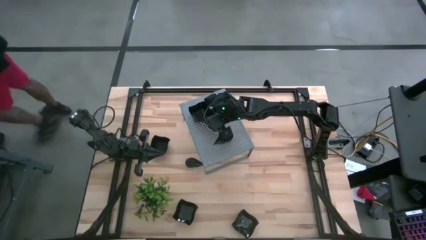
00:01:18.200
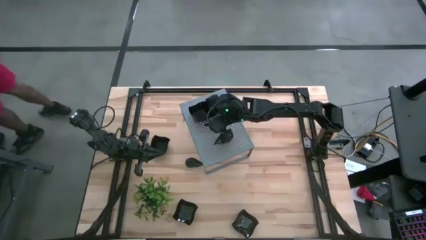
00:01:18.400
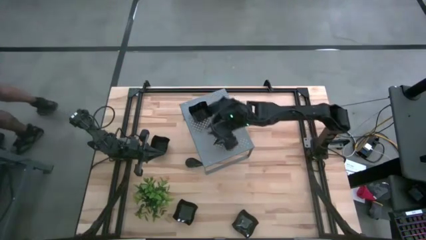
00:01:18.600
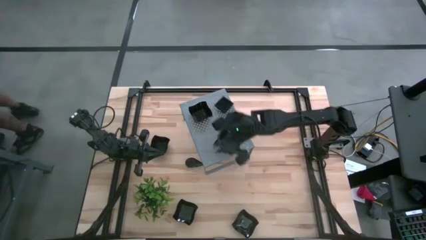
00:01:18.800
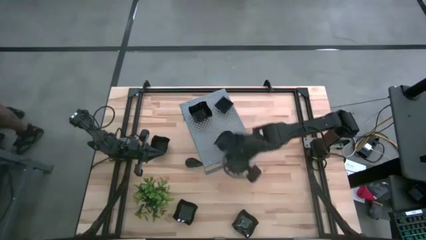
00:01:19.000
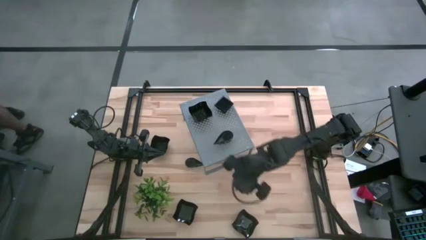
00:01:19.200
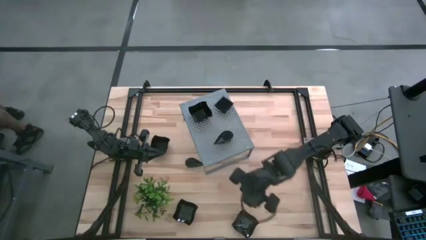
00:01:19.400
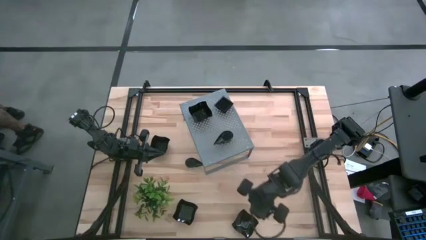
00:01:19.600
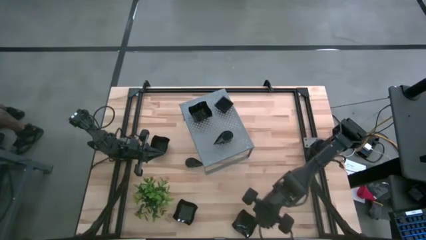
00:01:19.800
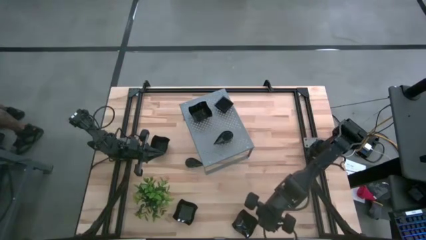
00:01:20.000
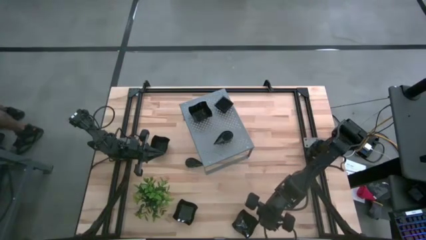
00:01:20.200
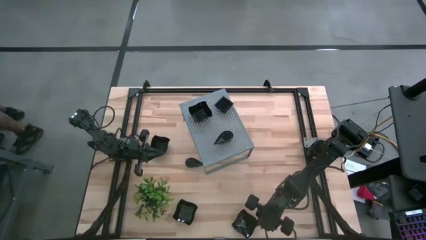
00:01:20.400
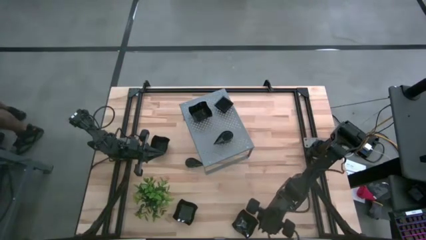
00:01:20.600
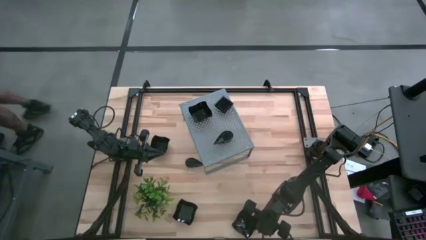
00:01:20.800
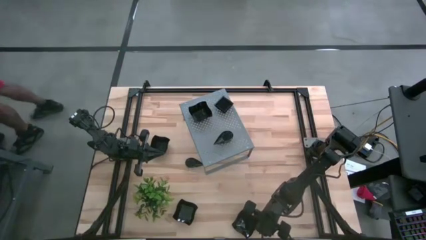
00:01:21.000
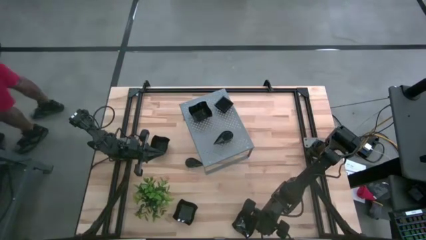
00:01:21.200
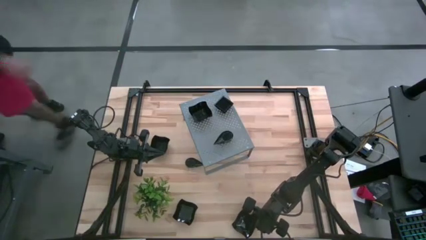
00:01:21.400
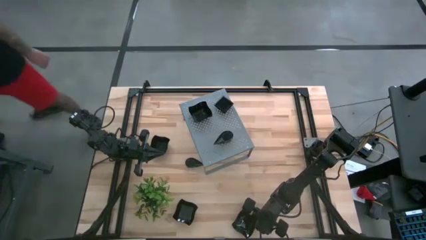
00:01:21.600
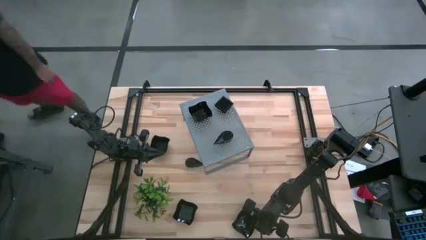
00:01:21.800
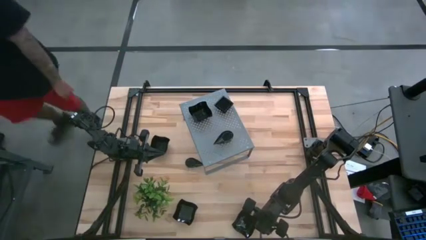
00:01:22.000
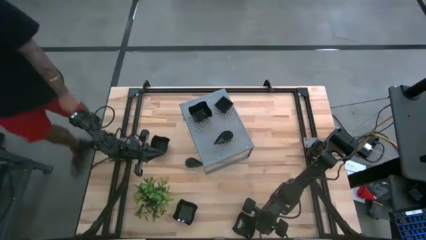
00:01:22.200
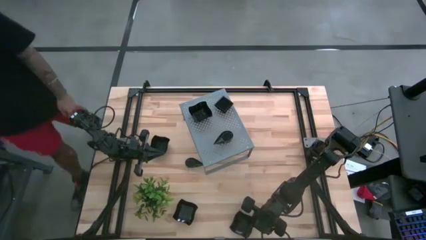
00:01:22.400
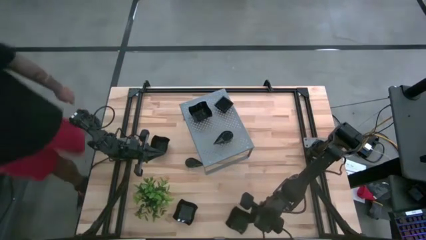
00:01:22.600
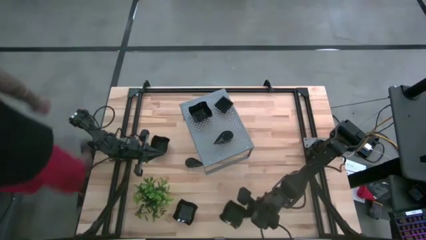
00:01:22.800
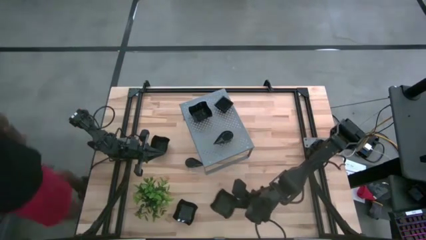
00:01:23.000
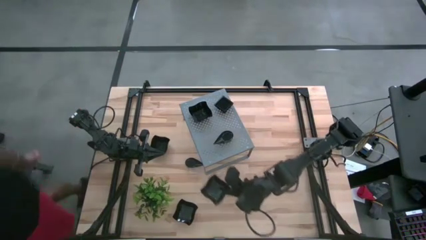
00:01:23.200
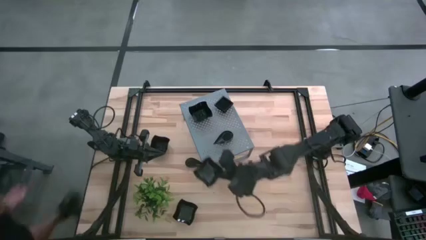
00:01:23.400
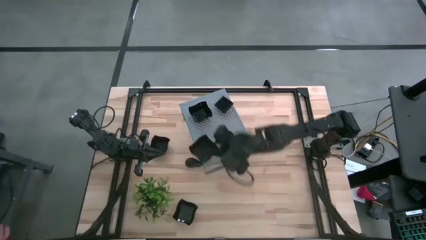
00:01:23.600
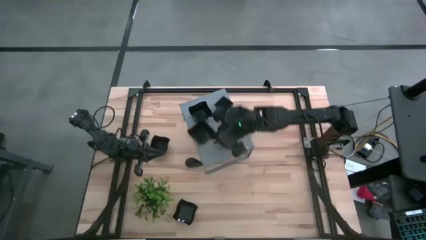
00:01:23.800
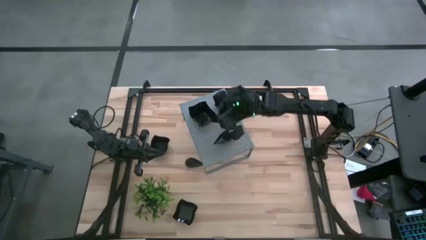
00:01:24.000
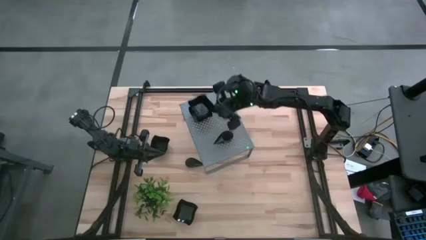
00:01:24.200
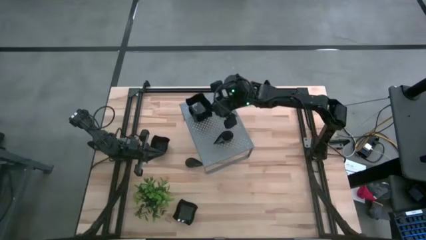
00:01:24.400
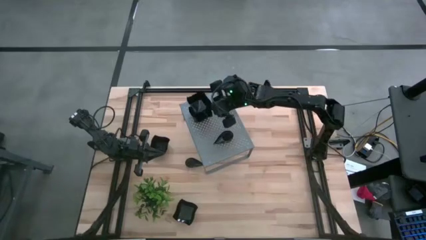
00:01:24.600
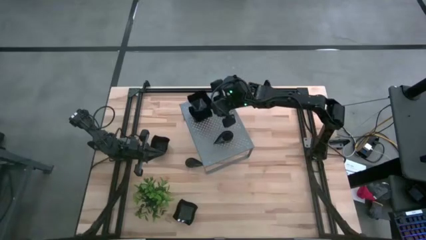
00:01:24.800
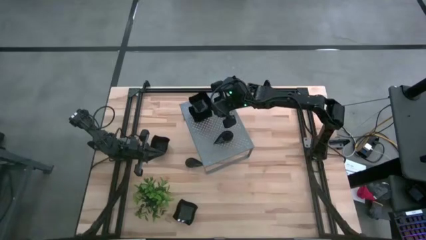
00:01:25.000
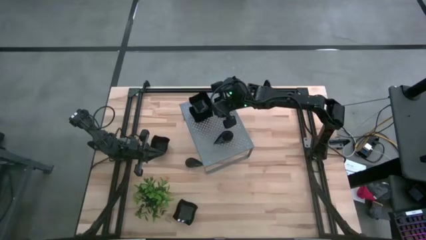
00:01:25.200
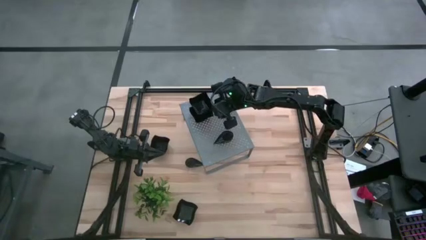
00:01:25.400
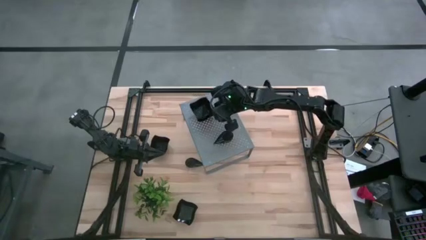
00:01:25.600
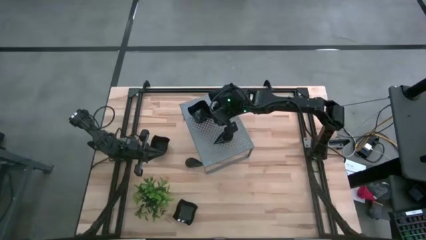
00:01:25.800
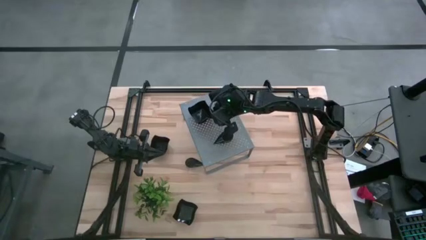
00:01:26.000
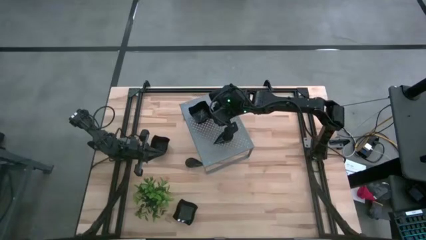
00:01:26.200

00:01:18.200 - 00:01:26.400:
Task: Pick & Place Mini shaped plates
Stack the distorted square plate on top of the distorted square plate on the shelf

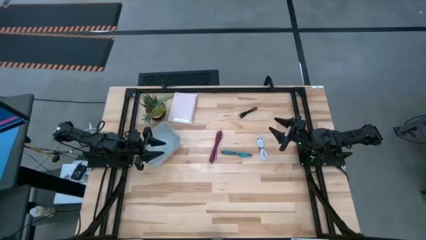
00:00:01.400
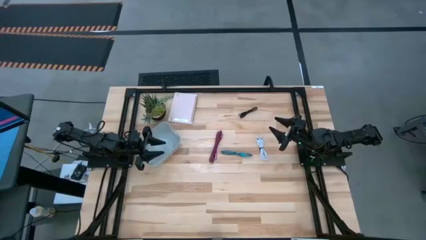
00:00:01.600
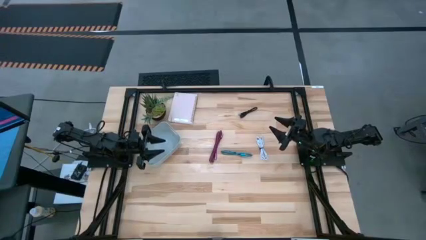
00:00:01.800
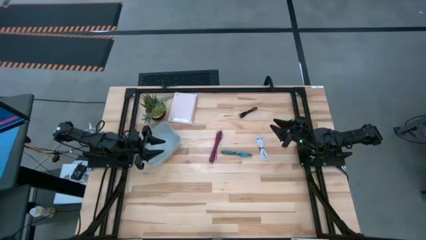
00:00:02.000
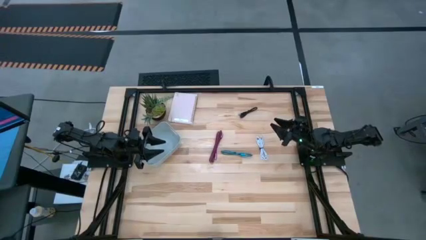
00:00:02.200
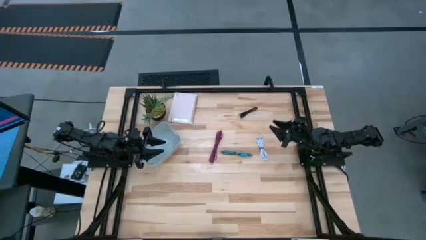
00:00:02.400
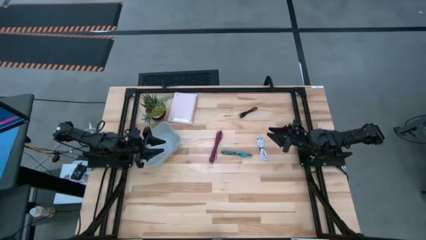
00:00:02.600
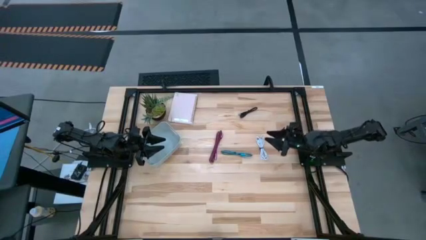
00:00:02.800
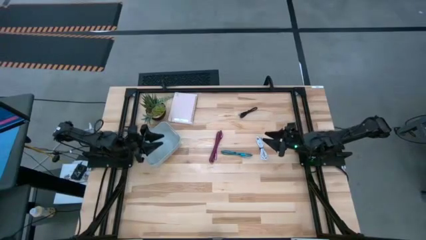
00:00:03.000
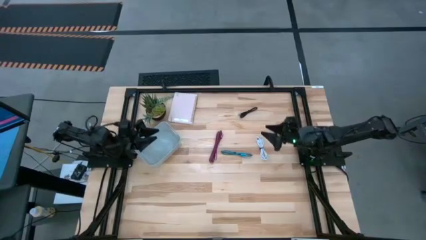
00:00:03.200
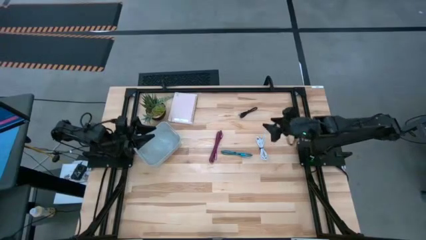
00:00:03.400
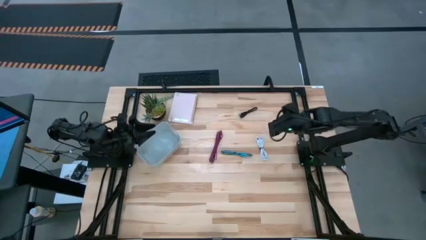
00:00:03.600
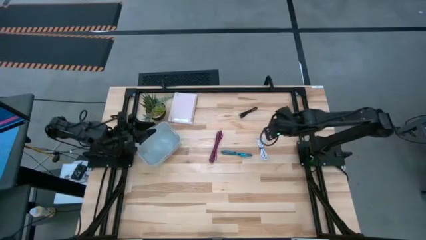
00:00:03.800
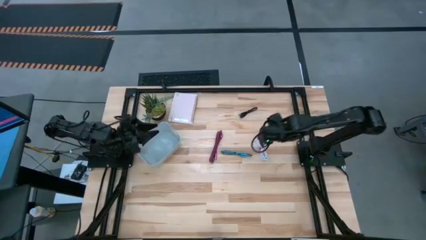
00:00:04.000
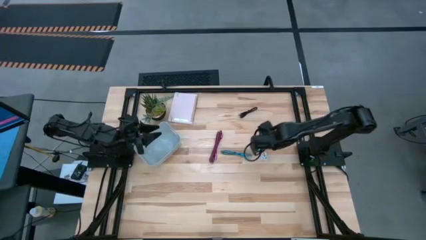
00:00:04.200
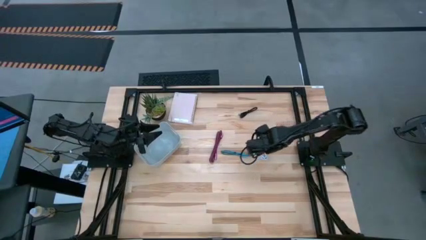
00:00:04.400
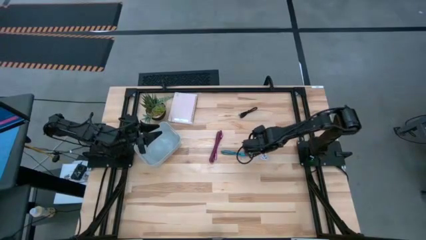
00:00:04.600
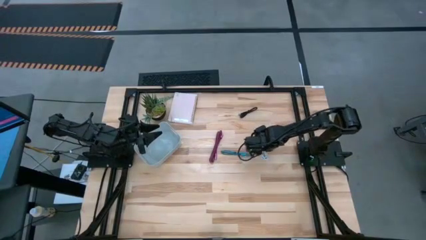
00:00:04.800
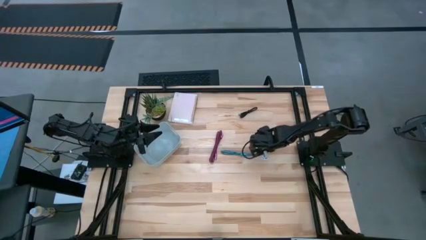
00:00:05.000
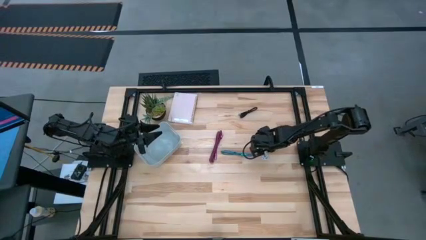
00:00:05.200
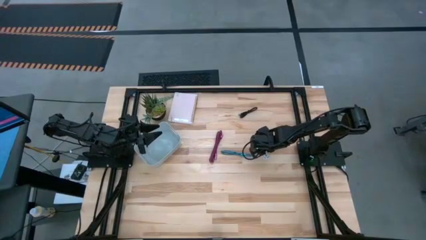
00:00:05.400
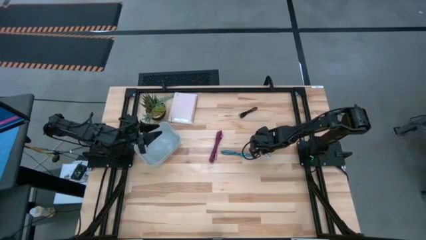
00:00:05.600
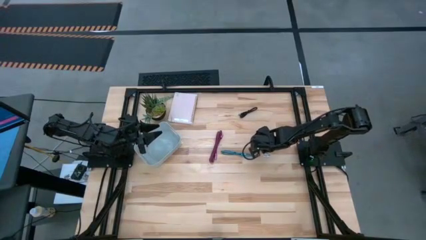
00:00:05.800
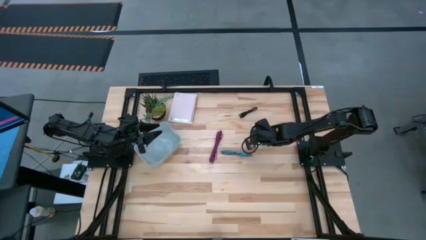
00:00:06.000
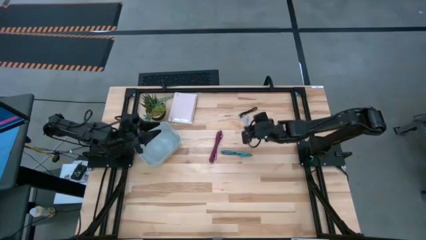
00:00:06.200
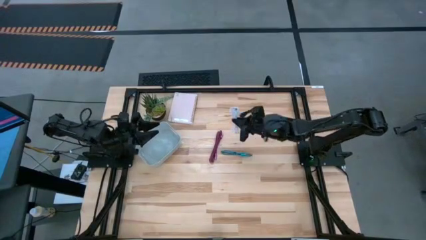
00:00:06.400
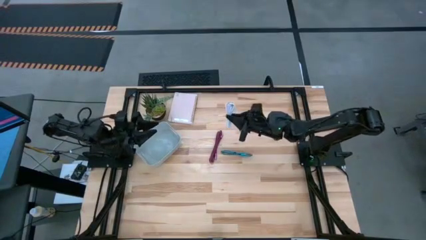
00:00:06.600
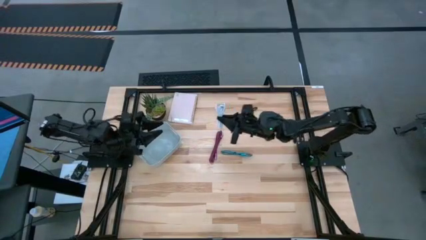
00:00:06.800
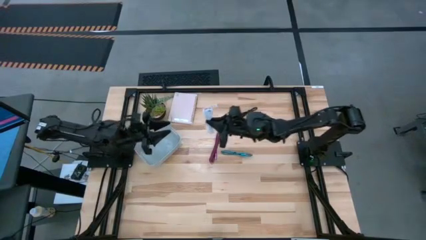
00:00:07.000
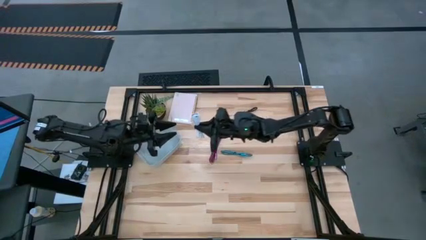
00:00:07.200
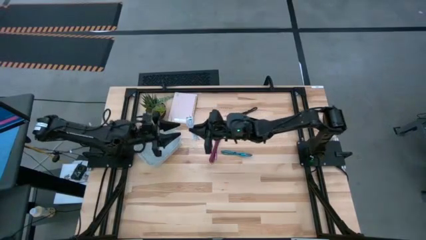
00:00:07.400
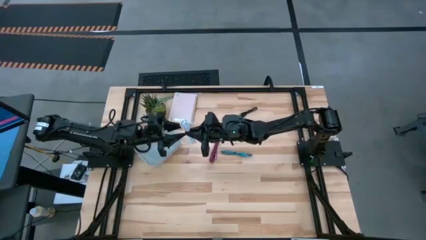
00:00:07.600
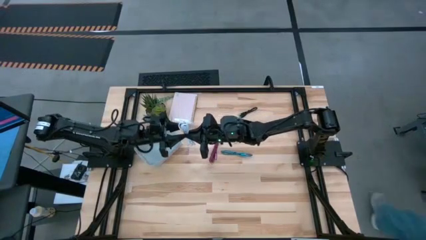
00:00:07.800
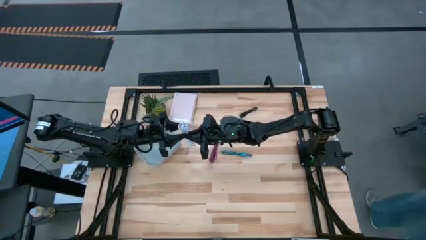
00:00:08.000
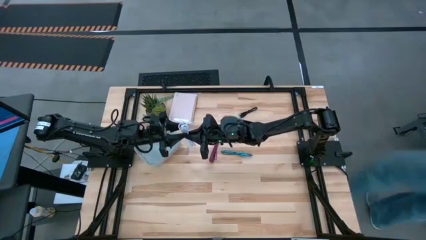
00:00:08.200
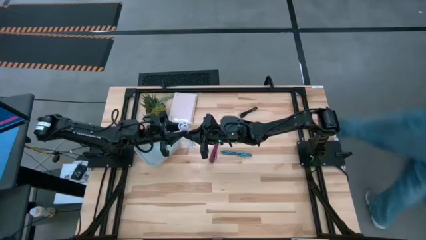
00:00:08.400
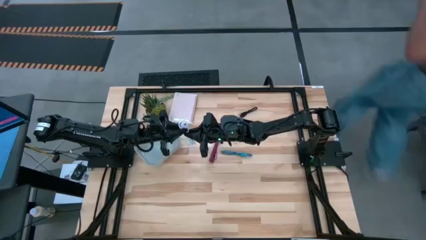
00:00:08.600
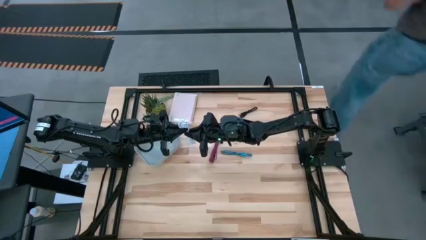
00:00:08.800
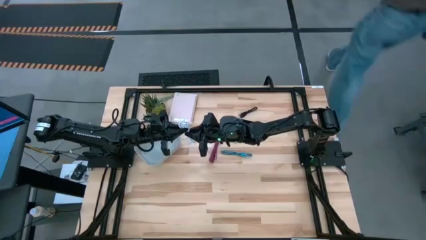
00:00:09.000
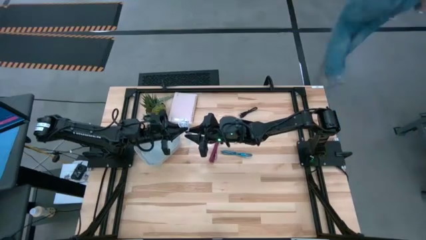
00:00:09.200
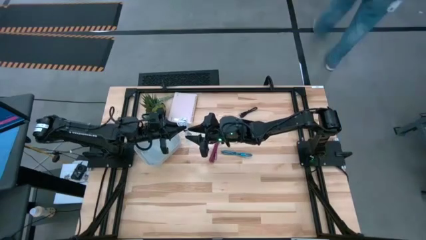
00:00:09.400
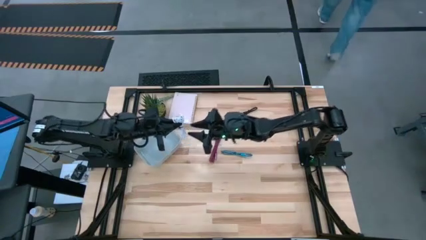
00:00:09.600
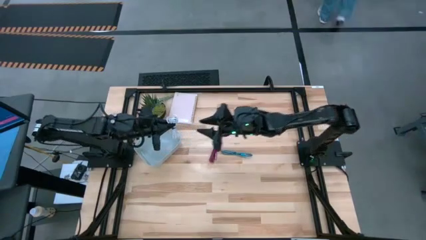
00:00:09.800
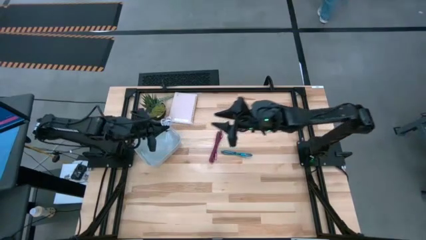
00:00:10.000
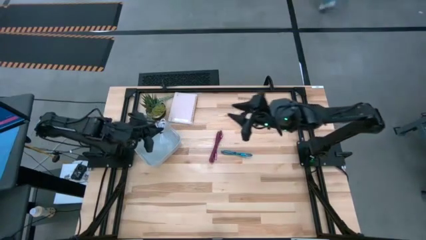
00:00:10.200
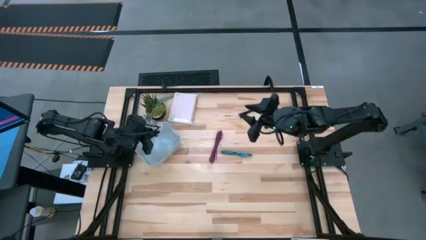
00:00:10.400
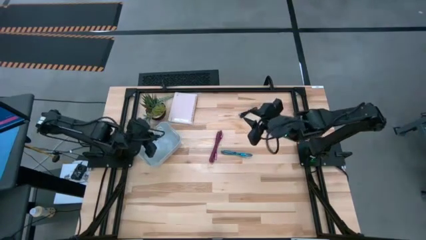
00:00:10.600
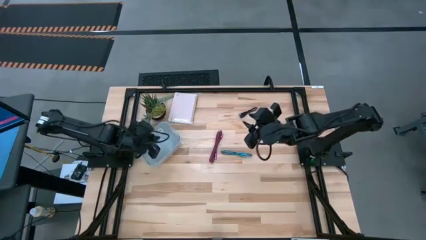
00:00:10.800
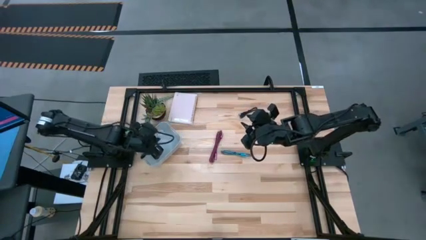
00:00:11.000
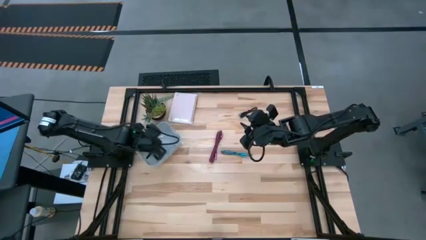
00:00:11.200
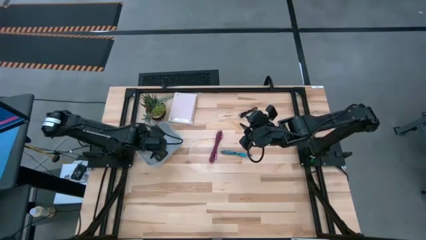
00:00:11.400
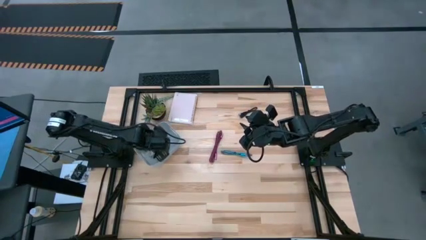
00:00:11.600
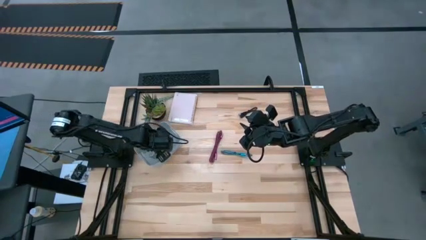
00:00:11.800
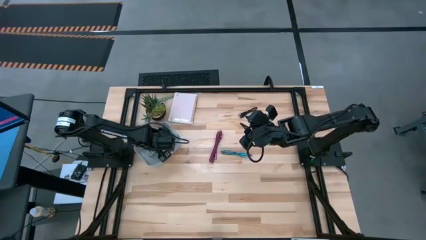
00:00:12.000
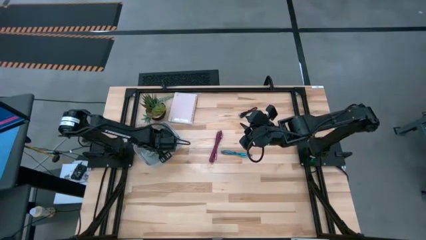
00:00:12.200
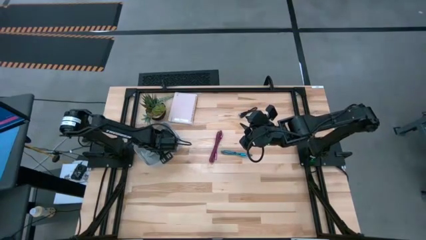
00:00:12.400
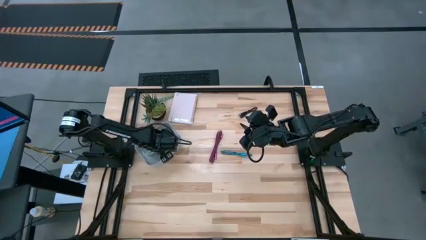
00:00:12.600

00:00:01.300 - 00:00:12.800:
Task: Pick and place USB-C Cables
Put the white USB cable into the gray bin
